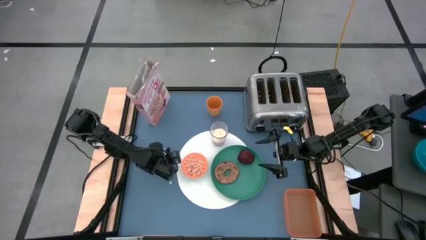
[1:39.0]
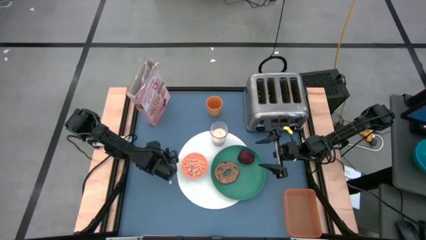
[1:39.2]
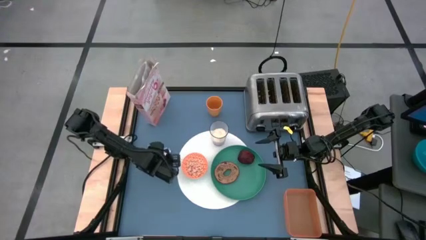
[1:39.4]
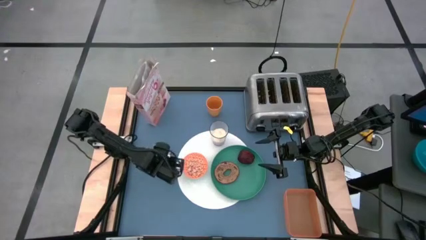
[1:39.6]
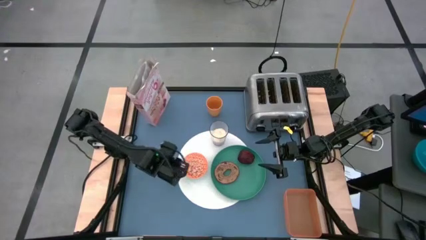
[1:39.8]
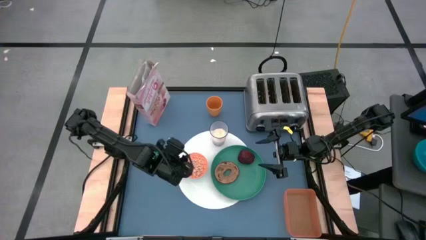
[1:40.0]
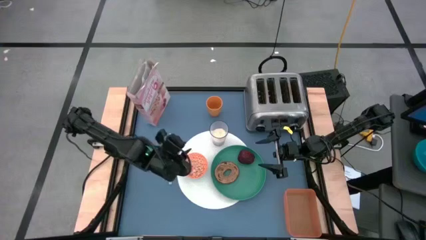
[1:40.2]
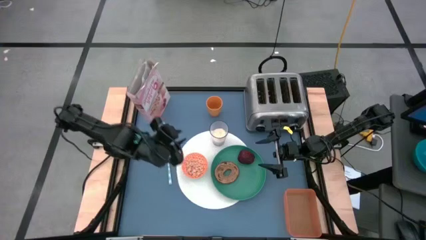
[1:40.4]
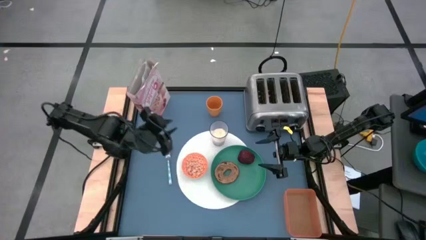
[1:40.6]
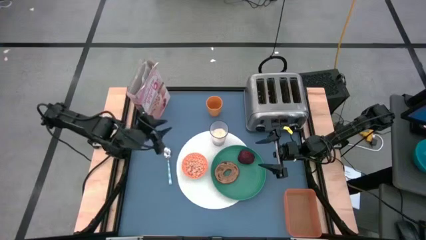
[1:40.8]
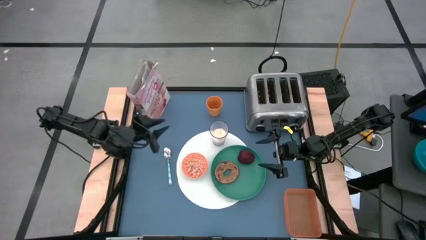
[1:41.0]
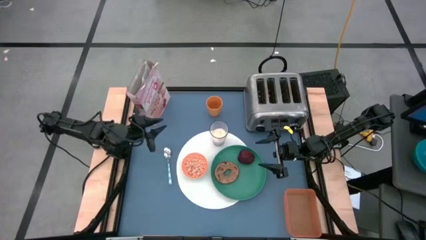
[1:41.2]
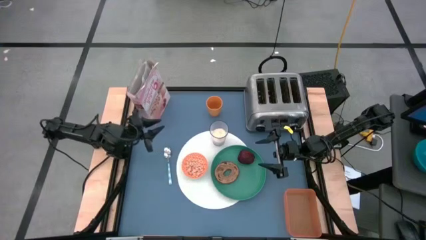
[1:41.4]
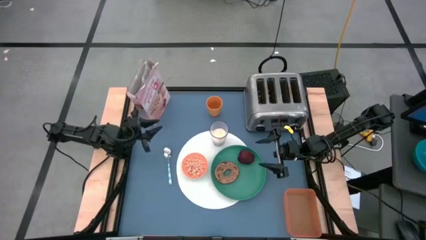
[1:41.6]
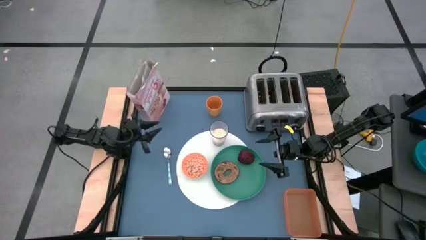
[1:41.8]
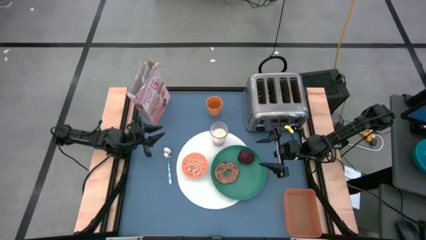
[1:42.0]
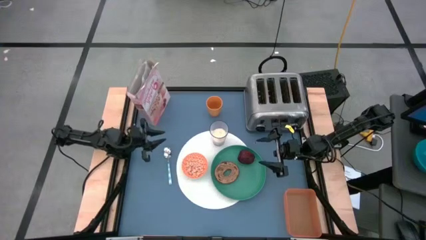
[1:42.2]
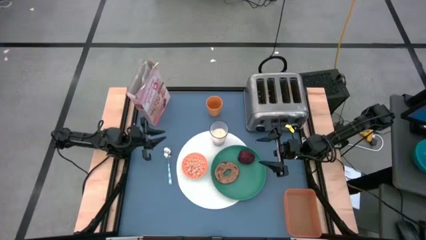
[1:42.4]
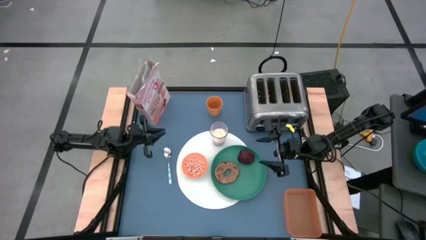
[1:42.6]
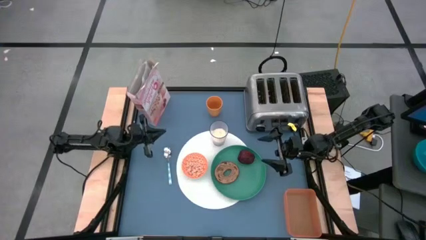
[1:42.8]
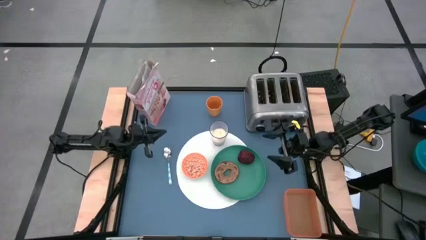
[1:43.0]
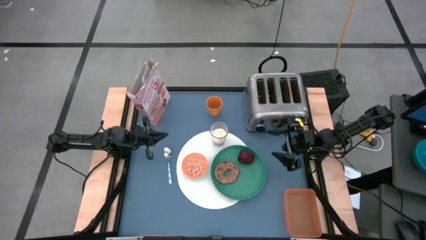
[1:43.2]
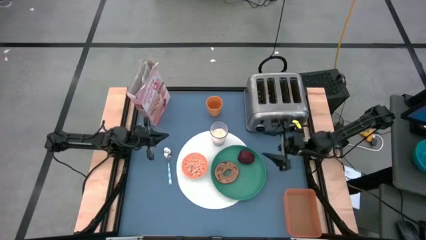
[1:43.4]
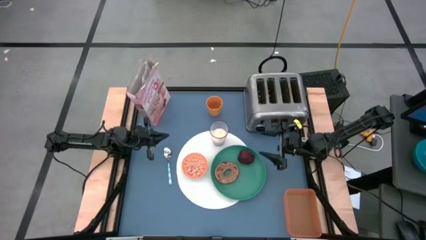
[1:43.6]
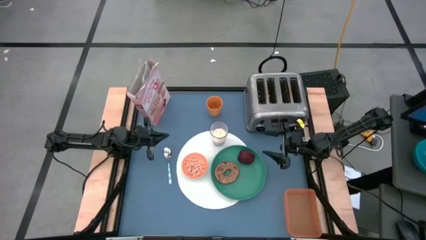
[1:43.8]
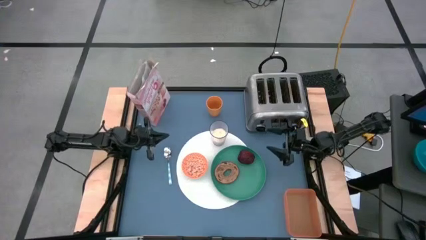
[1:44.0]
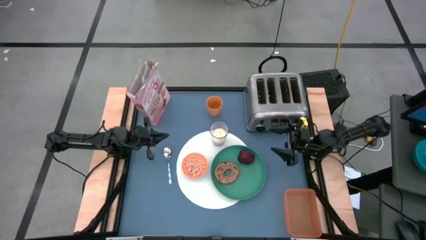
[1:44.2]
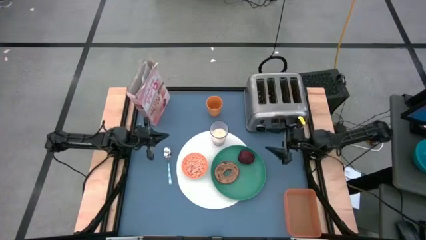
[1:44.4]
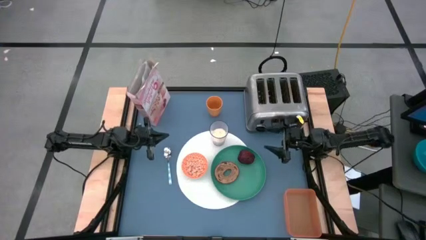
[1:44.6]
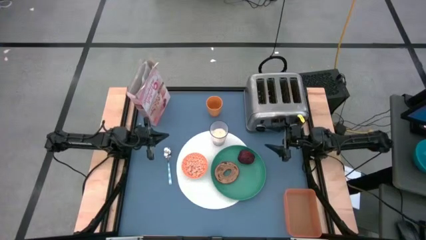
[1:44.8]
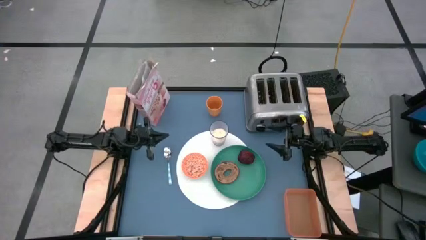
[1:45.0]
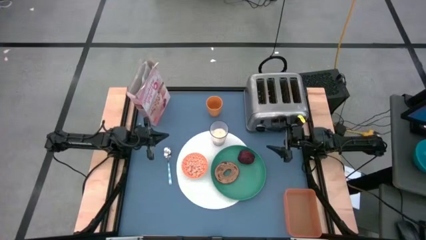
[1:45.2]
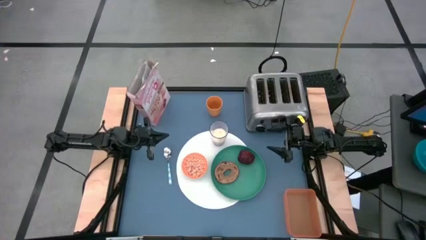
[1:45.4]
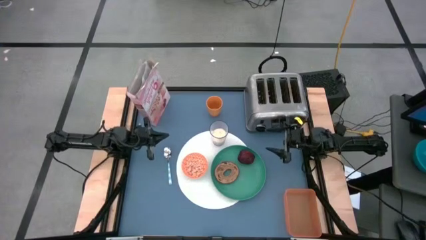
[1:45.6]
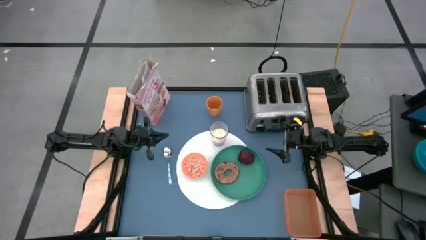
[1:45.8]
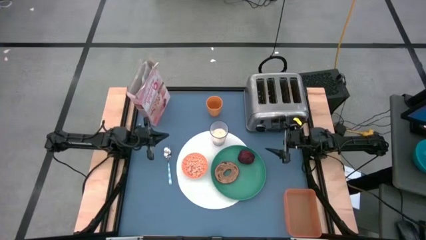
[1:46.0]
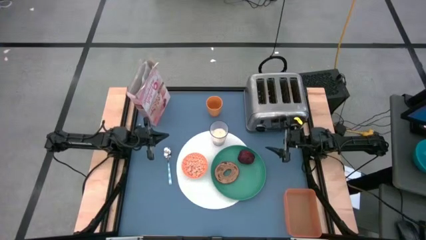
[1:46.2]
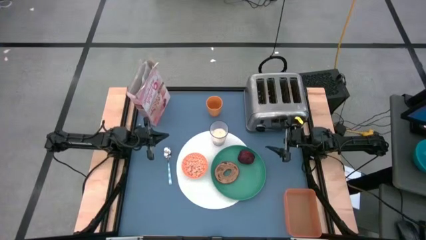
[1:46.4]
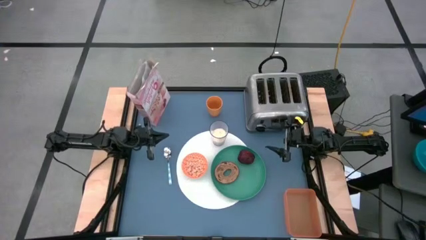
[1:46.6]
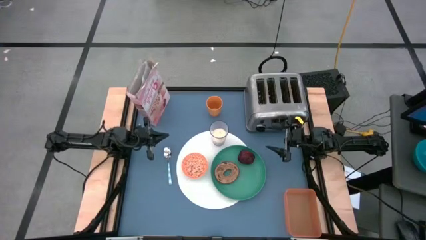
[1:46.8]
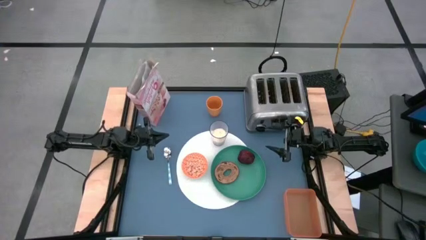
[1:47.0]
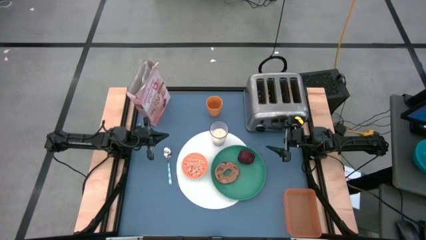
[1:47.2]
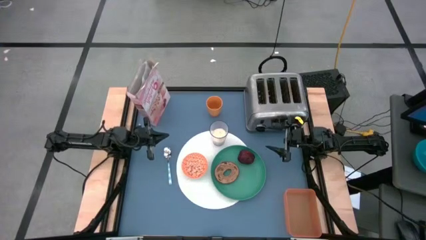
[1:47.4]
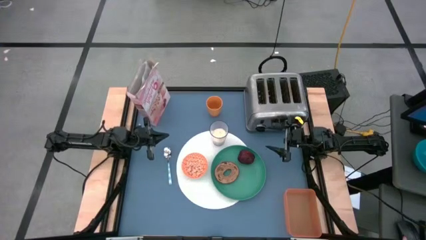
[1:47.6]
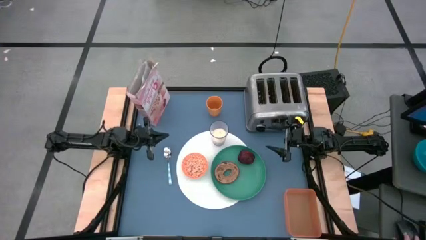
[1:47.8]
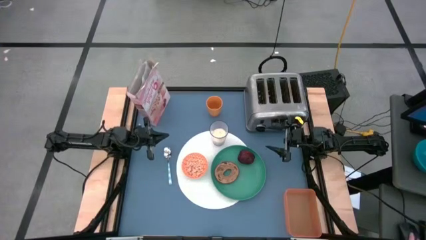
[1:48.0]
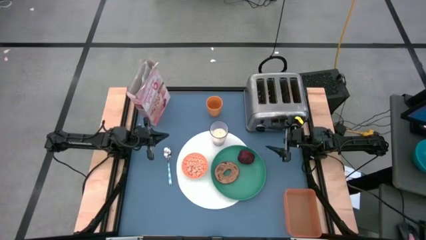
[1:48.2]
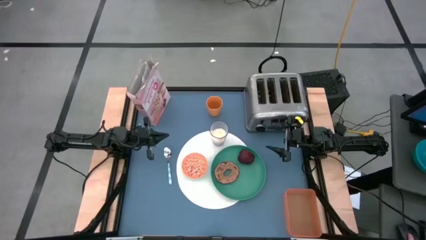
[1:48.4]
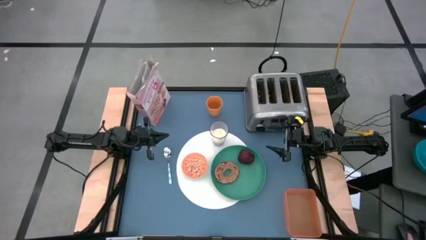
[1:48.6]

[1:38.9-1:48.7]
Task: Arrange a breakfast setting
Return to Home Position

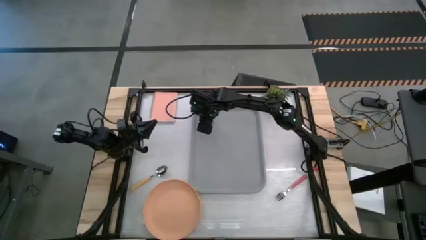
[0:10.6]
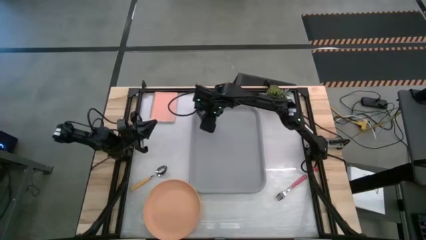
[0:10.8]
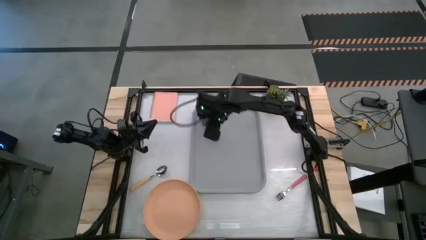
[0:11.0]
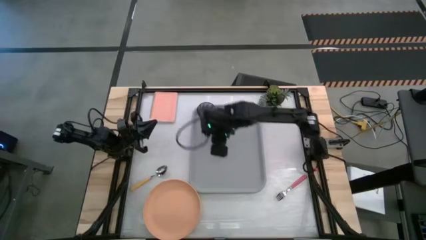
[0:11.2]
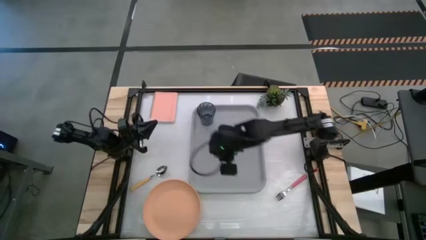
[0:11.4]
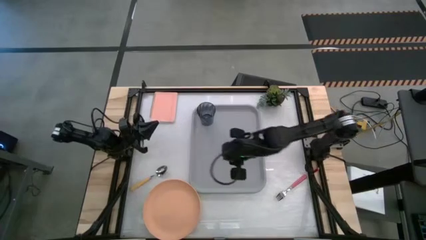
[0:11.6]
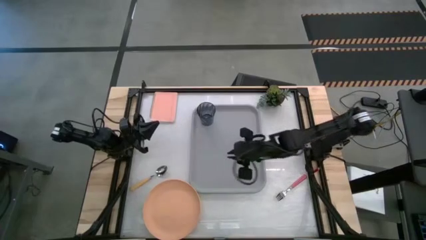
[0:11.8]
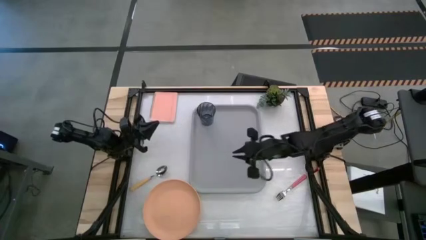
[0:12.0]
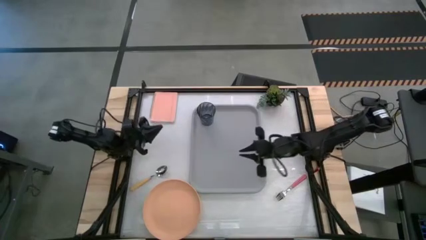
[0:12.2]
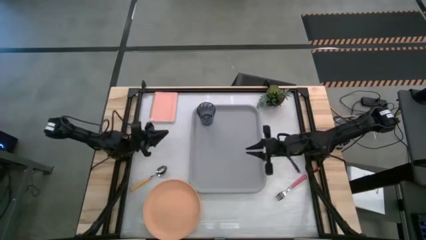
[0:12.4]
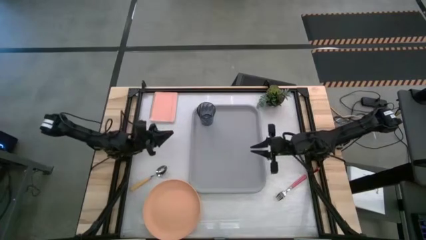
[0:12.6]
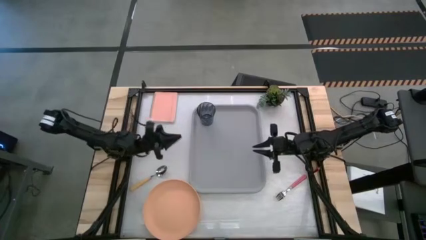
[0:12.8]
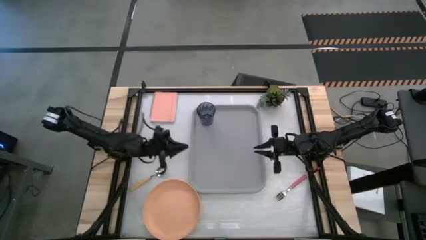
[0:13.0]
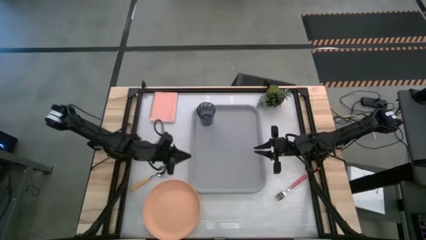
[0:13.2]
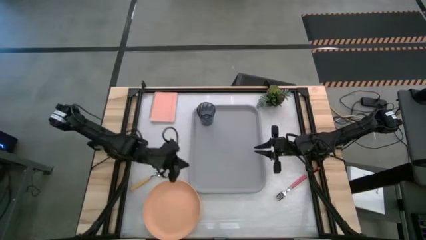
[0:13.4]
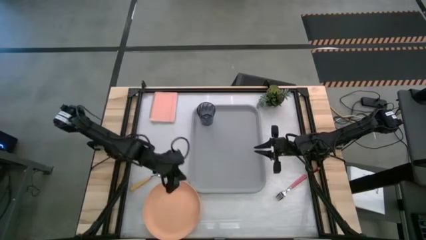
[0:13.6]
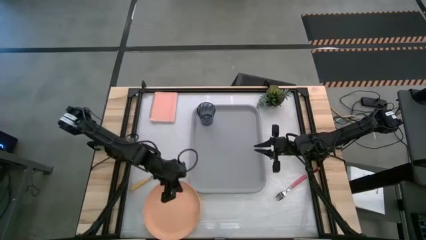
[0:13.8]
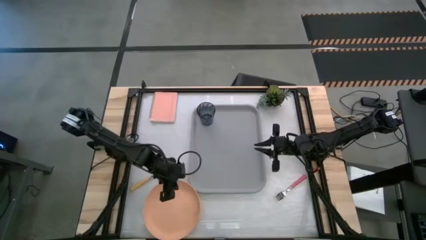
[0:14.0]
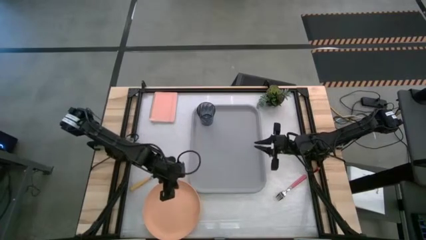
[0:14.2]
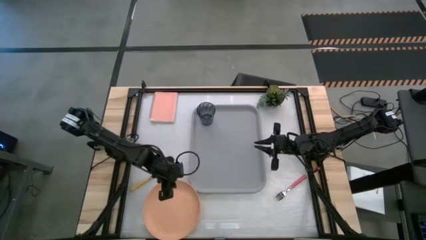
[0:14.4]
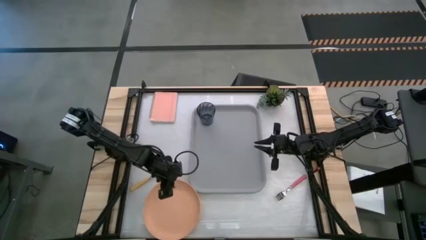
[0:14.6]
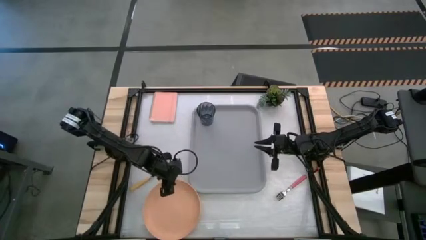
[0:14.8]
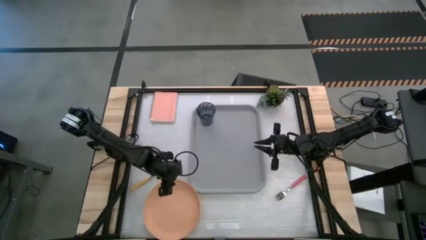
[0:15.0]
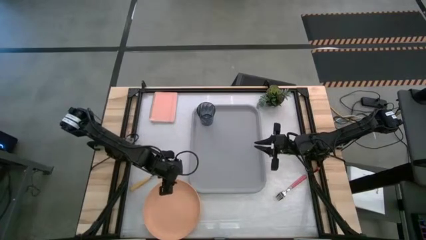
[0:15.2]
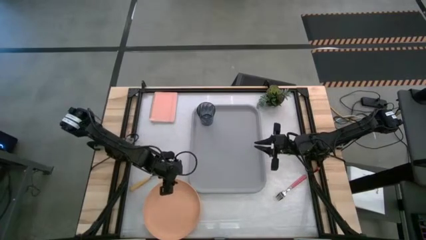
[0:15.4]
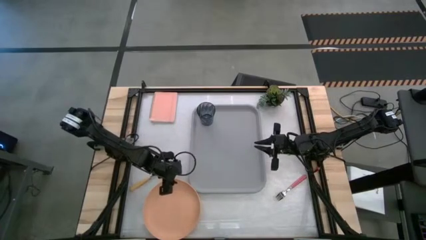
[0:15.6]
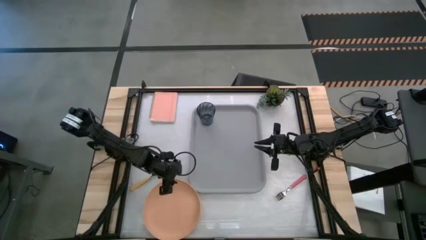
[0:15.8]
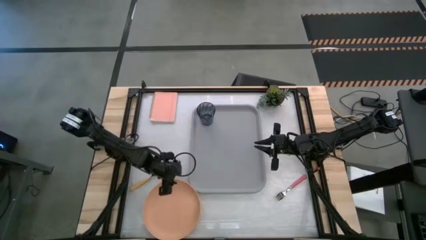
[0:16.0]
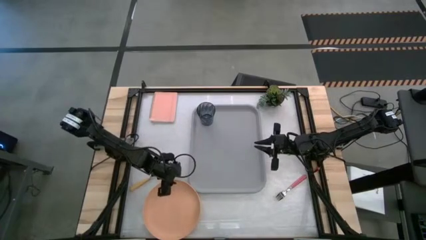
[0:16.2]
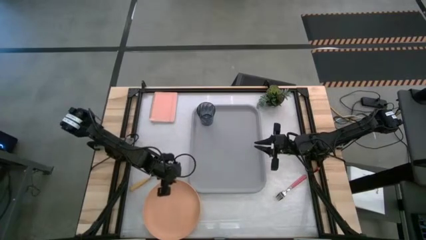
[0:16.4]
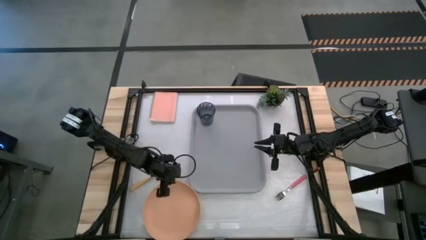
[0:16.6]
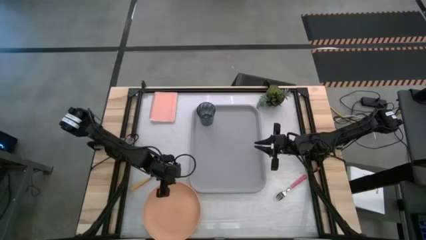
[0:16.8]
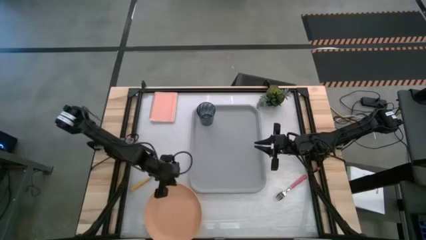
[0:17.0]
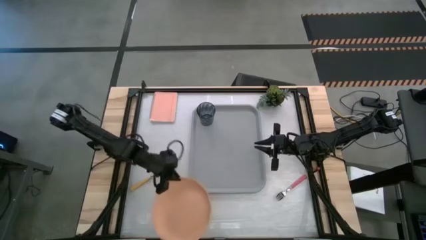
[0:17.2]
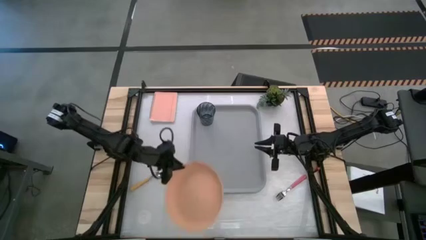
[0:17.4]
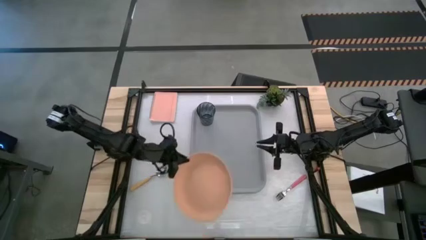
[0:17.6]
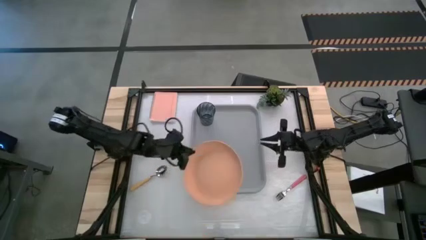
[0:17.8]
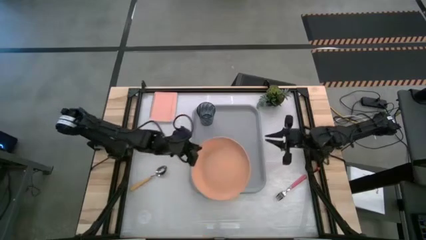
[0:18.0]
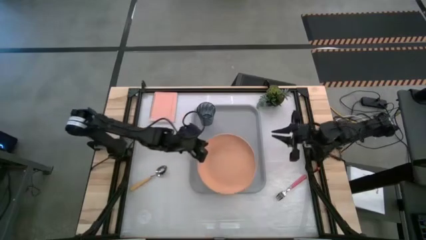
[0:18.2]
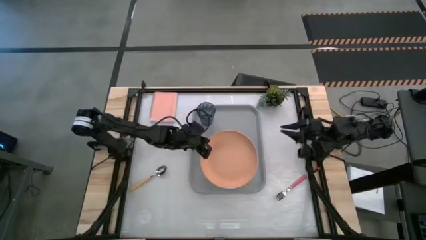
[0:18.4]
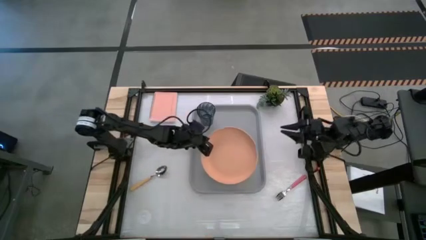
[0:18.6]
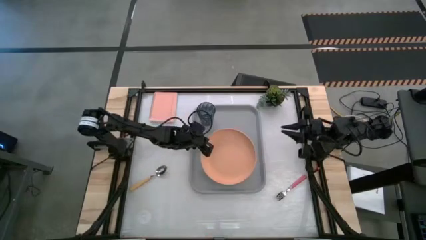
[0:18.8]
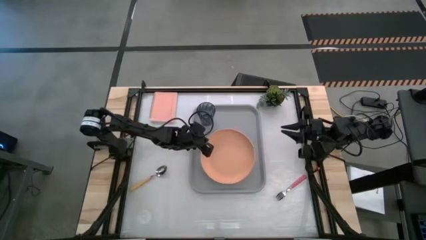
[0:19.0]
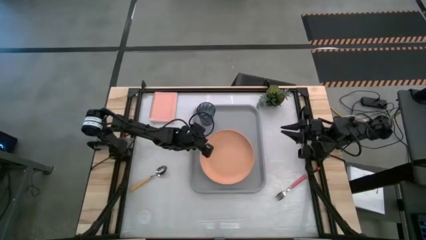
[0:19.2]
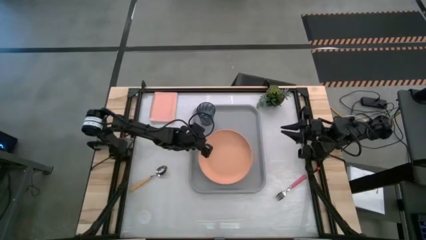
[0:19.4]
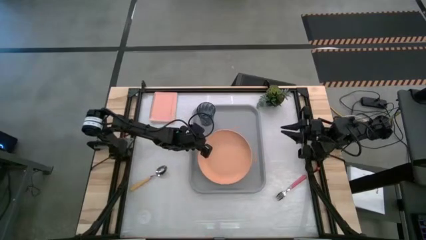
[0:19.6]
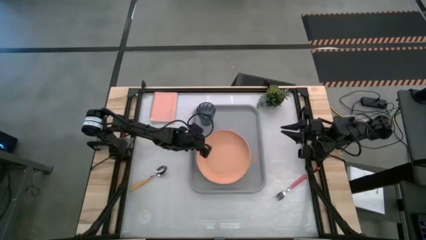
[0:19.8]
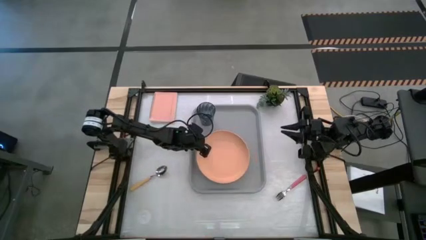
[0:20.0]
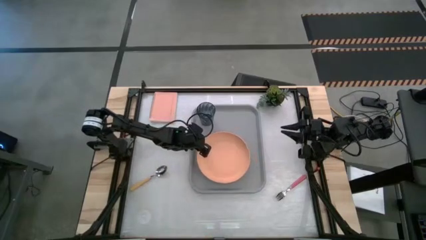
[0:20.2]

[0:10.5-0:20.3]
Task: Pick and place plate/cup/fork/spoon on tray
Put the orange plate on the gray tray to the bottom of the black cup
